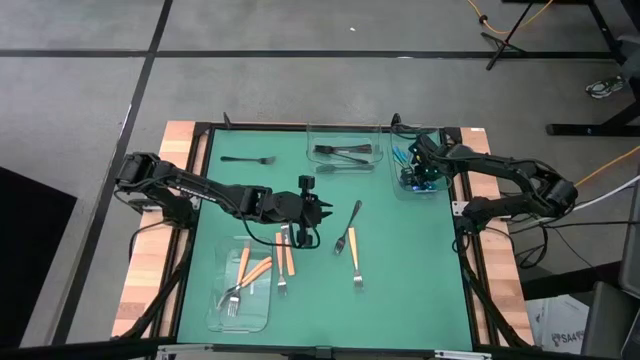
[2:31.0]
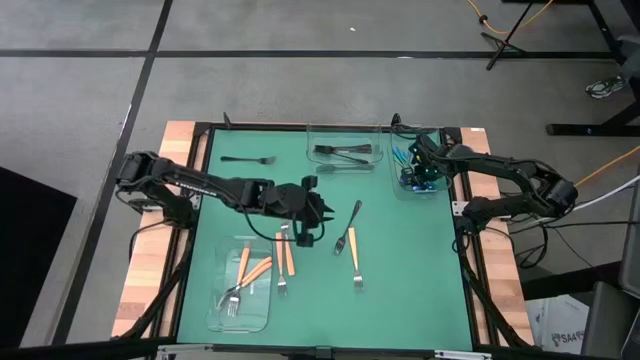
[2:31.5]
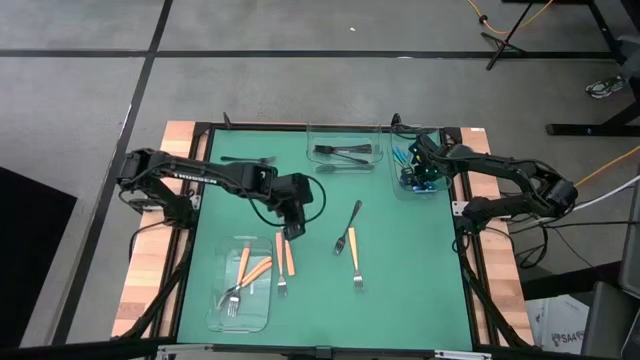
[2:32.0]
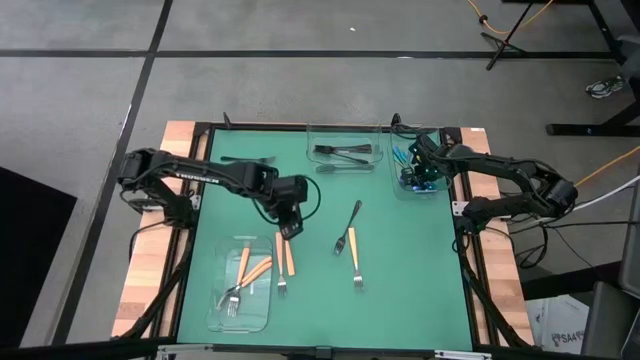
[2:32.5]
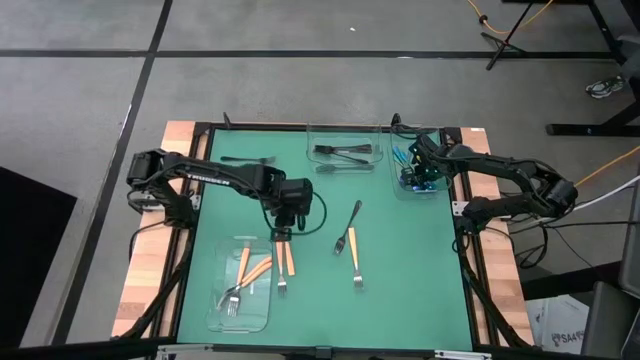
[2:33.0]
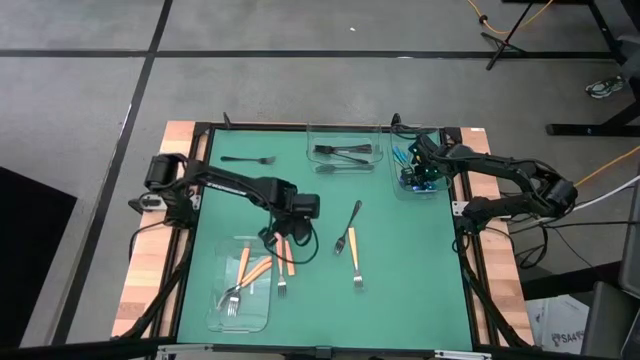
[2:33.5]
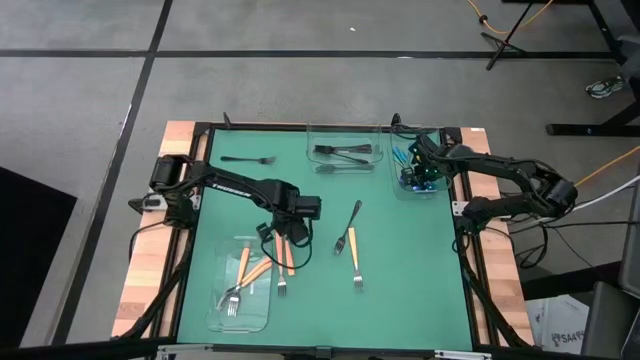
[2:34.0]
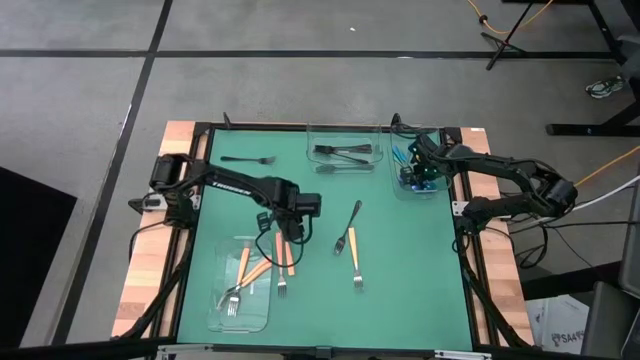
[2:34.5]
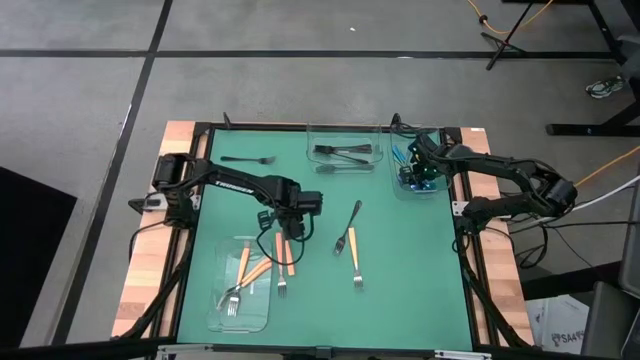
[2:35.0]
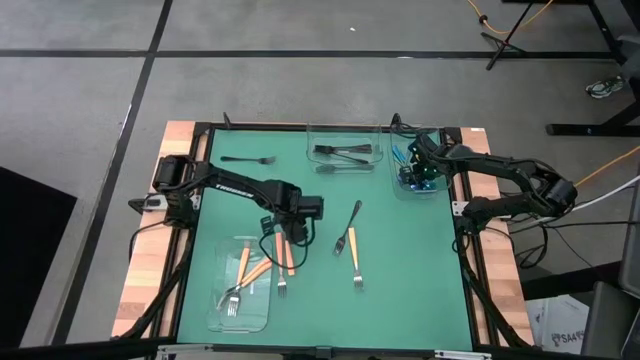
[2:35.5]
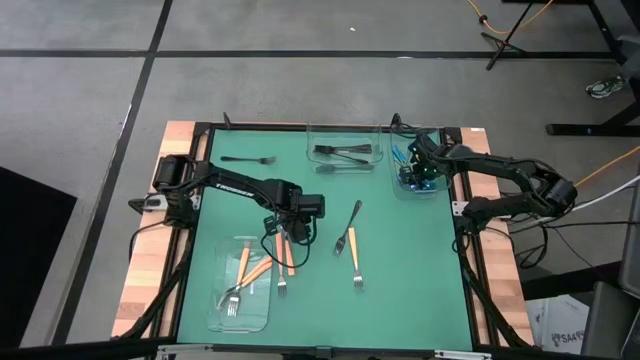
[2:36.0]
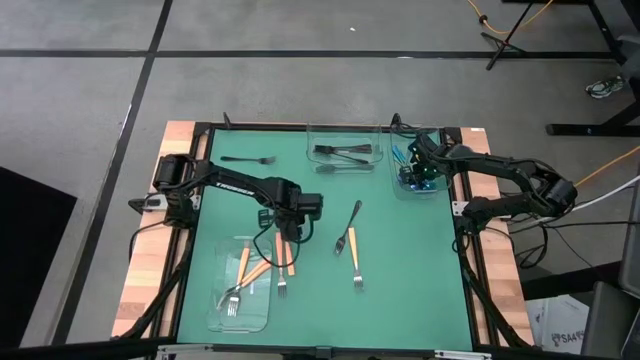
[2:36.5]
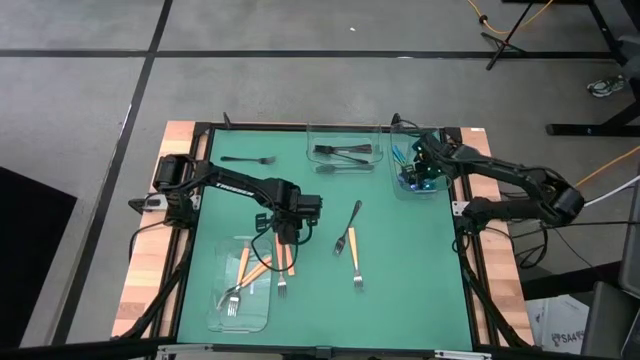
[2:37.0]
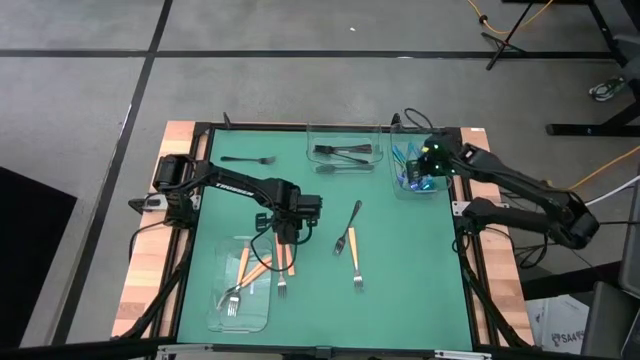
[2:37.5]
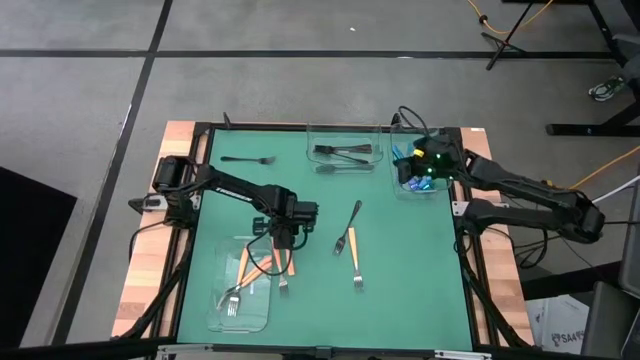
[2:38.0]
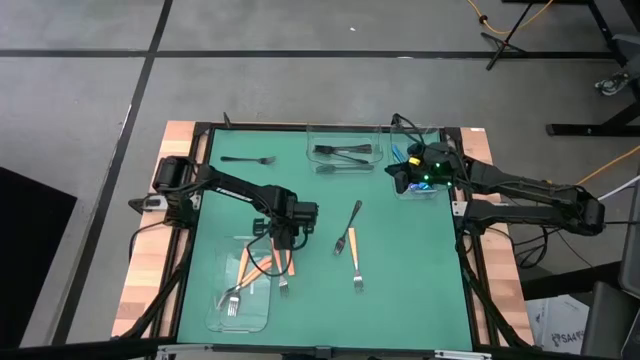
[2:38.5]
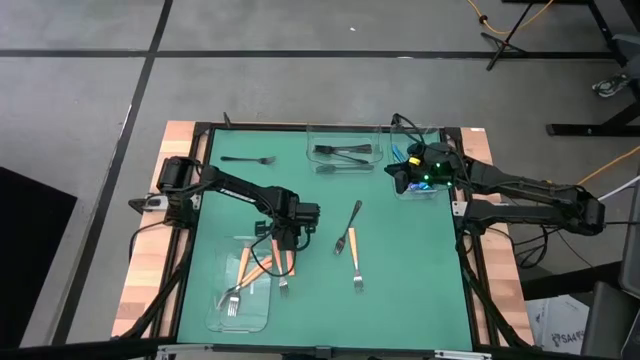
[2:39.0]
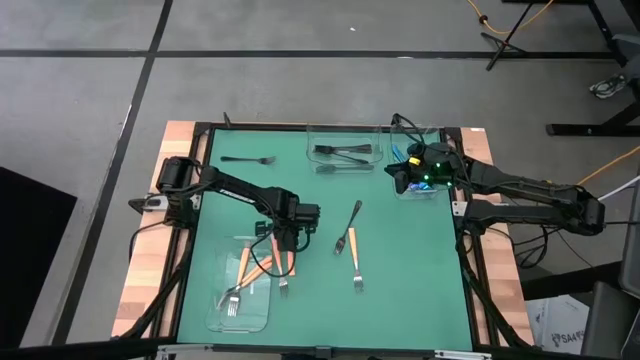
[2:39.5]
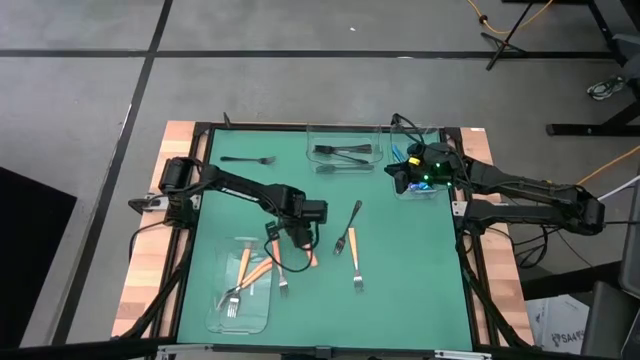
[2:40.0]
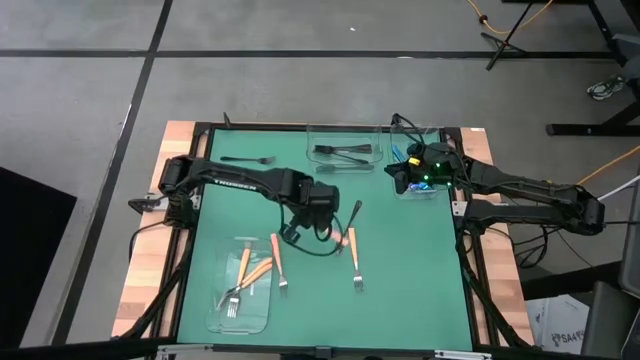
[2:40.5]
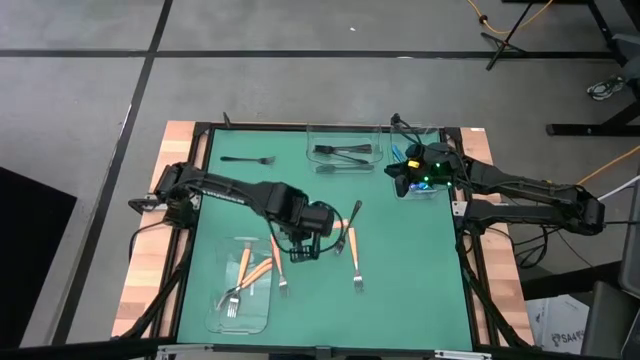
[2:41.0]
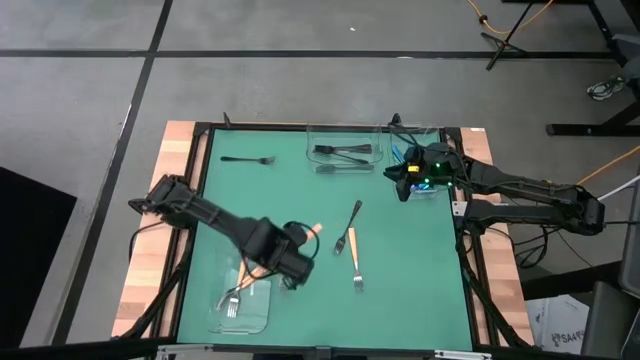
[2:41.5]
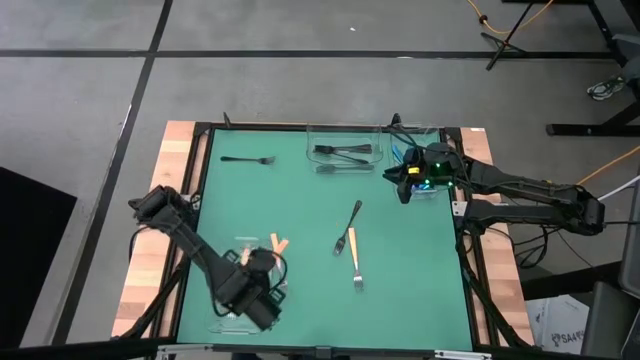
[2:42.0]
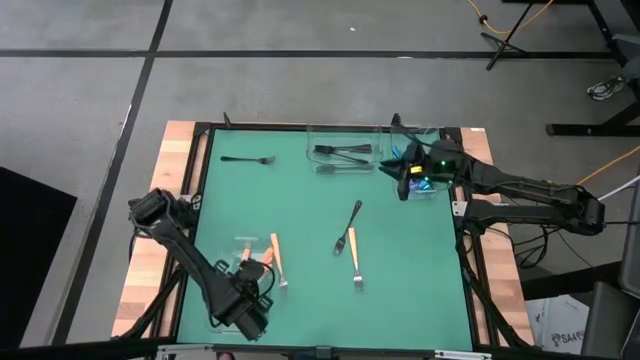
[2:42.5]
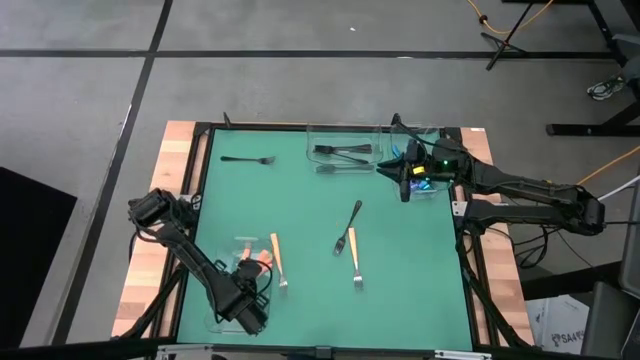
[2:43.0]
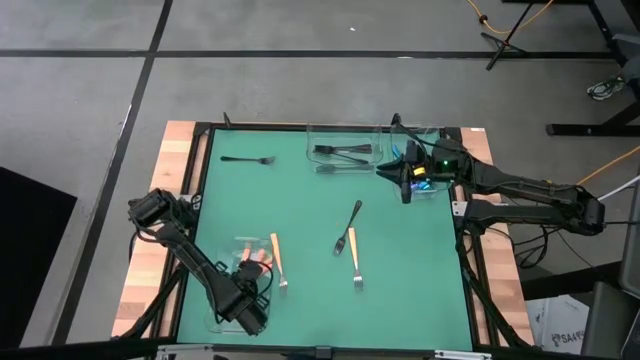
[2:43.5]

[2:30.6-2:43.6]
Task: Sort silverware by color (type)
Put the orange fork into the bottom transparent bin

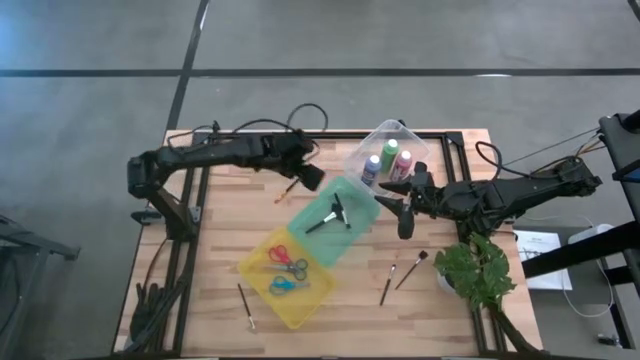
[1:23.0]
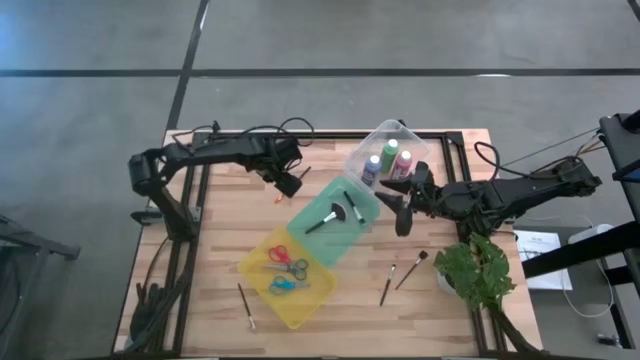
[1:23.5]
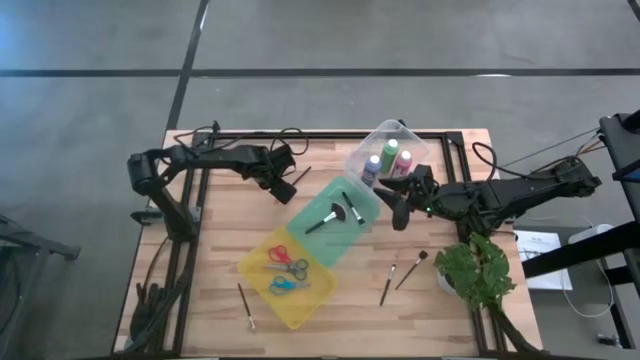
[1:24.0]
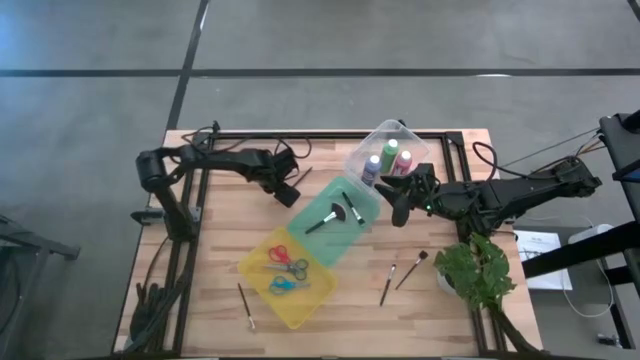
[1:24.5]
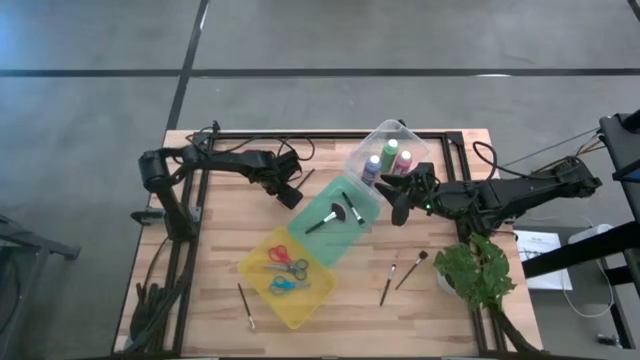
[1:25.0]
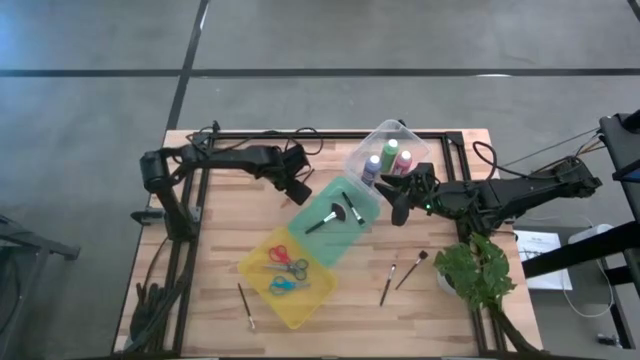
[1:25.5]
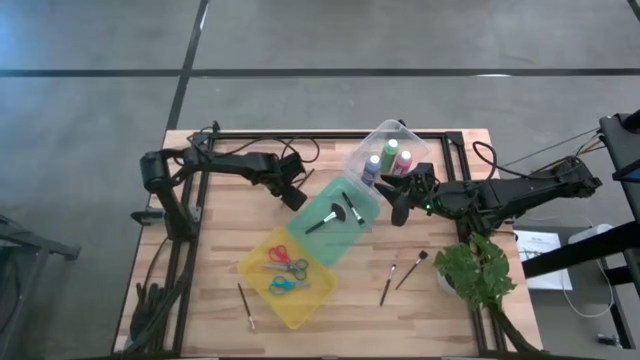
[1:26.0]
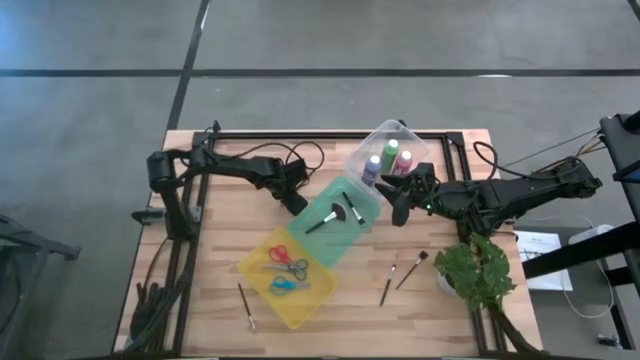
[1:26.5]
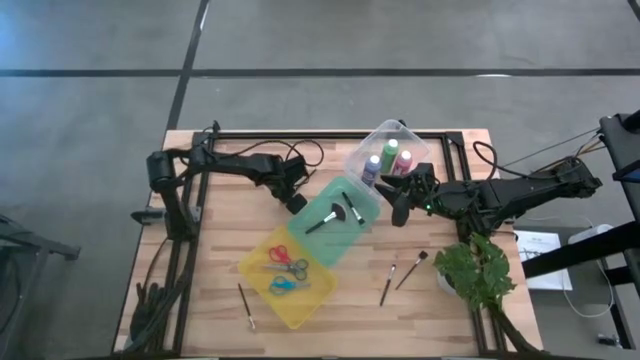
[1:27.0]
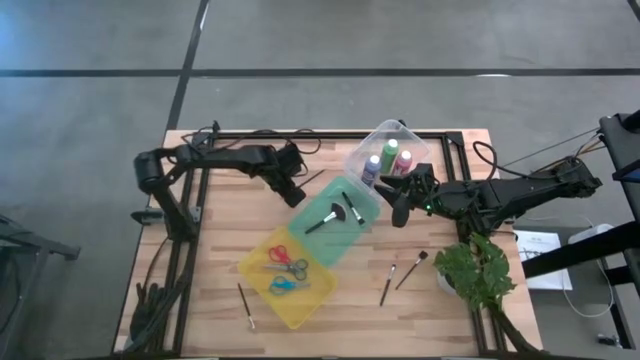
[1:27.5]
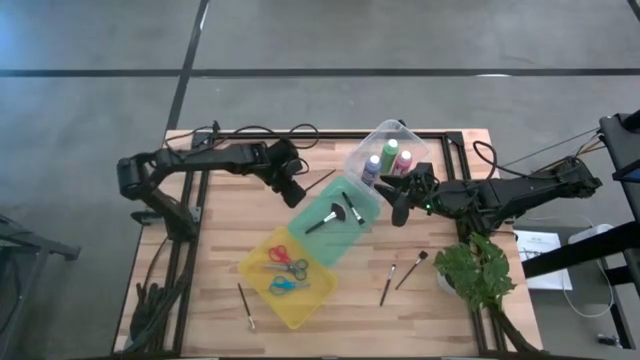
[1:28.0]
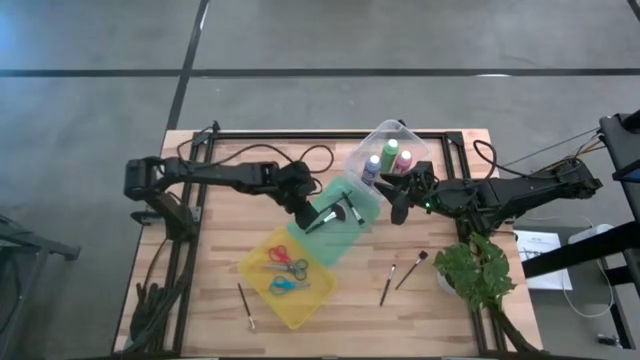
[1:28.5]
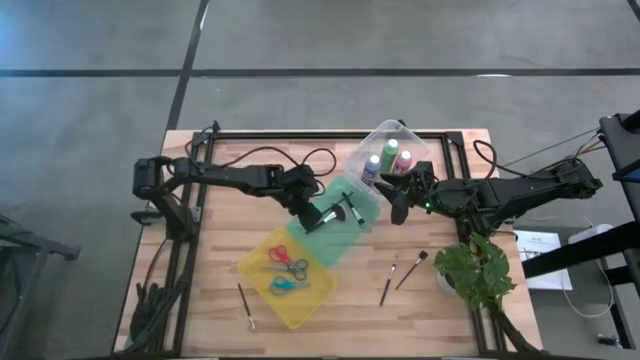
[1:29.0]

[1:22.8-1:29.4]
Task: Pick & Place Paint Supplies
Put the black paint brush into the green bin

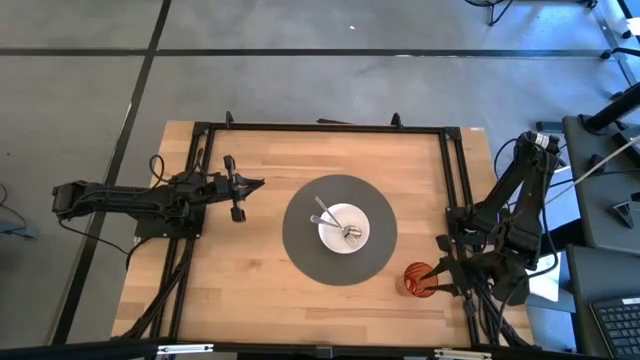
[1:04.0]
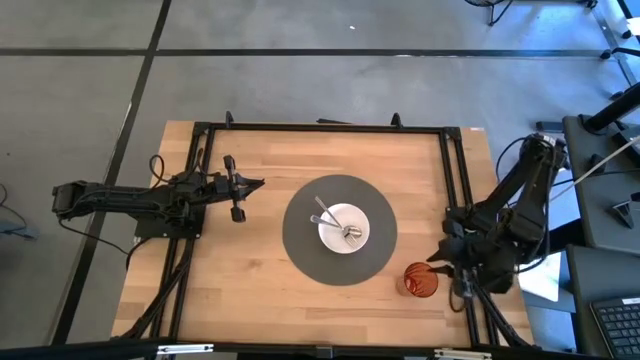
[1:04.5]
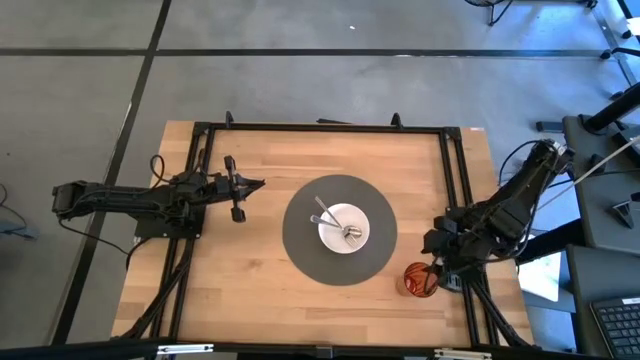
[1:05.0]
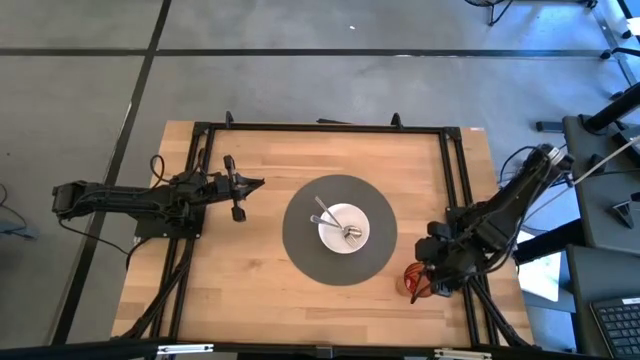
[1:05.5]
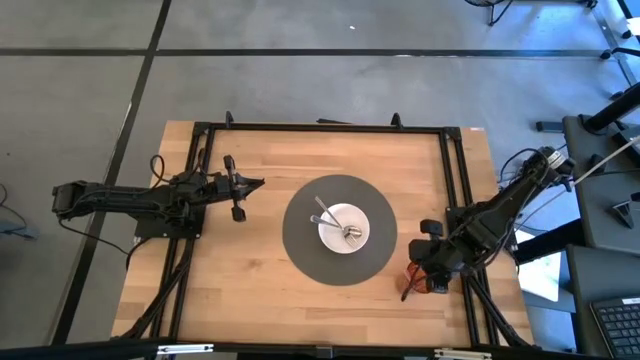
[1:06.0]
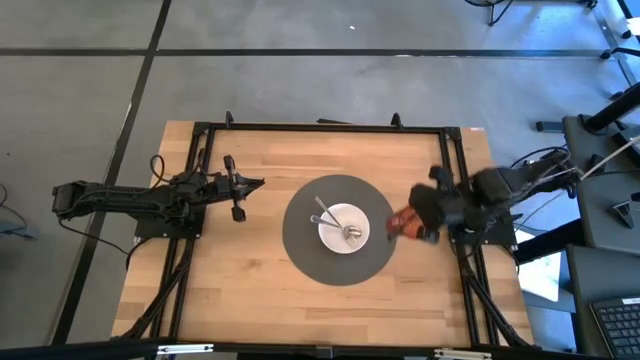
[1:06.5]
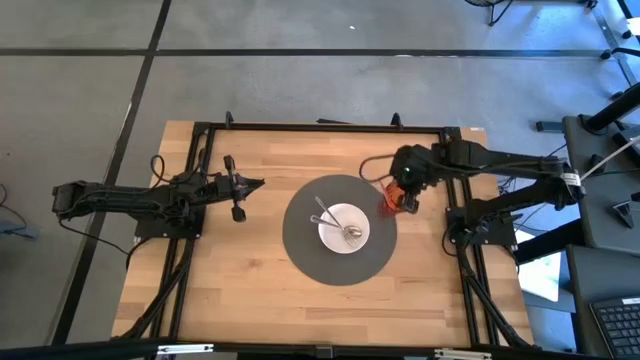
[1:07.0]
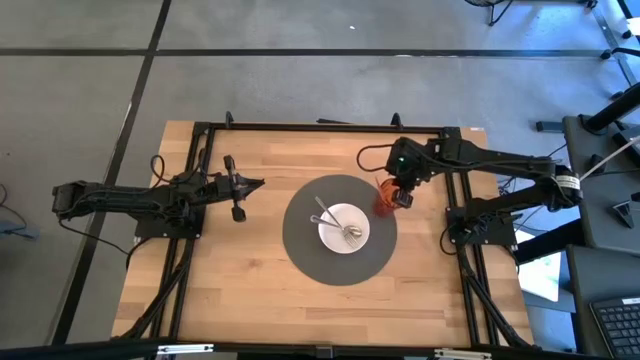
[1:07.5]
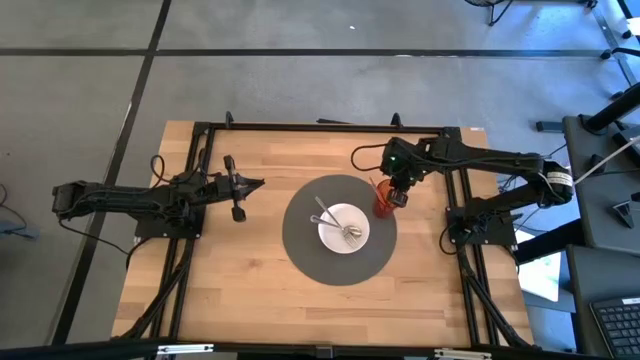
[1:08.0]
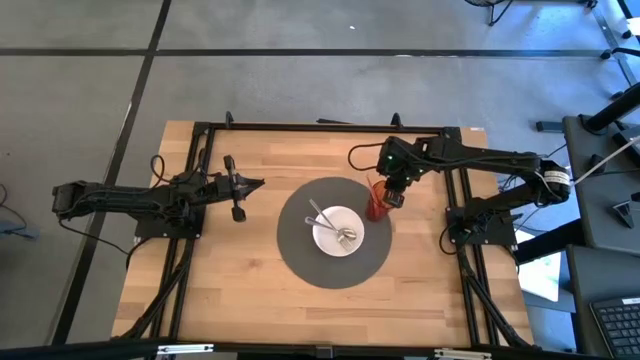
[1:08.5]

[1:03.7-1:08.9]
Task: Pick & Place Utensil
Put the orange cup on the right of the table mat
